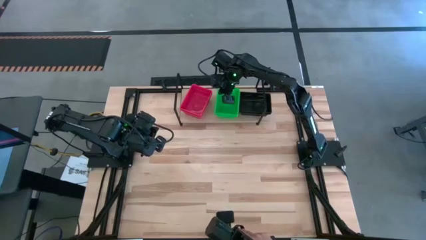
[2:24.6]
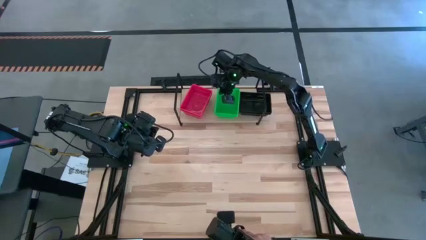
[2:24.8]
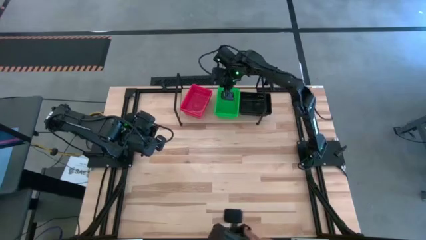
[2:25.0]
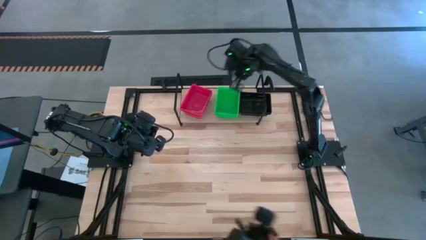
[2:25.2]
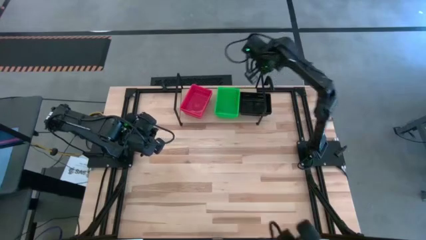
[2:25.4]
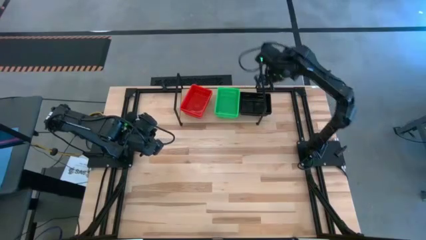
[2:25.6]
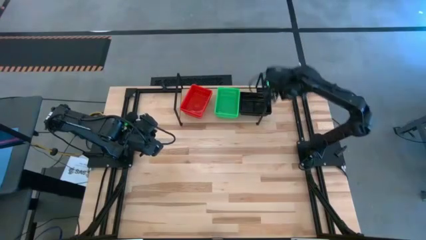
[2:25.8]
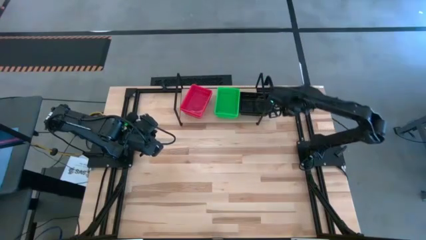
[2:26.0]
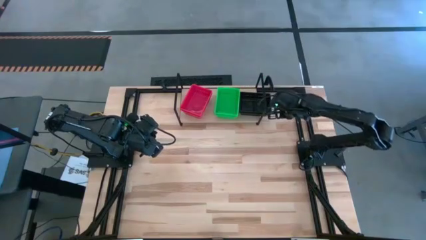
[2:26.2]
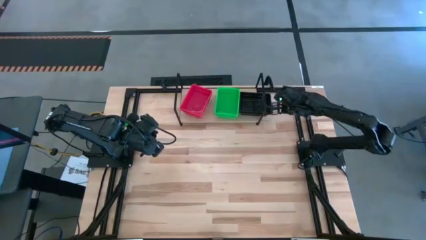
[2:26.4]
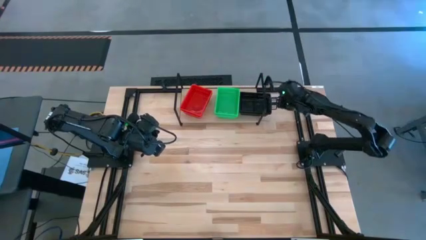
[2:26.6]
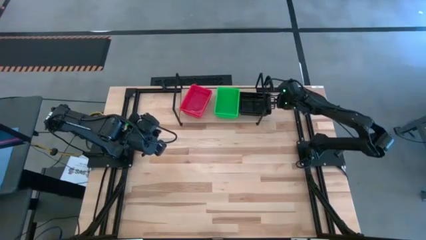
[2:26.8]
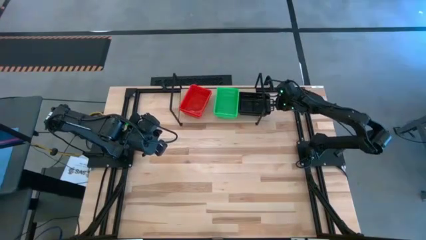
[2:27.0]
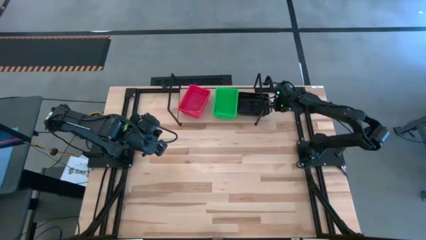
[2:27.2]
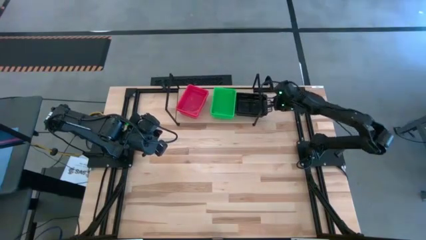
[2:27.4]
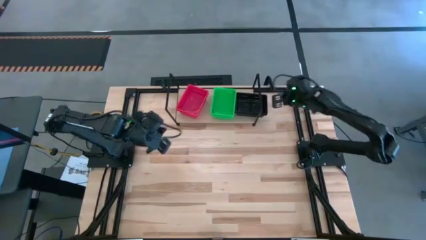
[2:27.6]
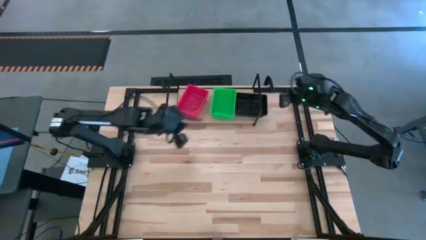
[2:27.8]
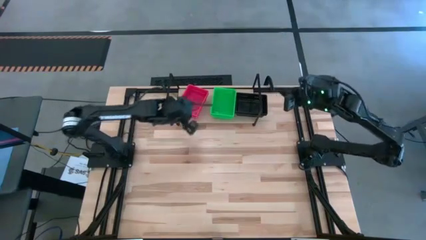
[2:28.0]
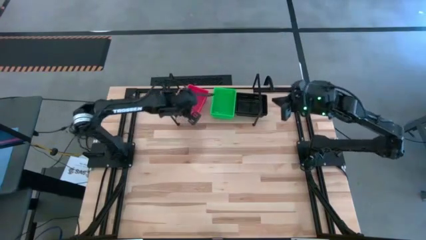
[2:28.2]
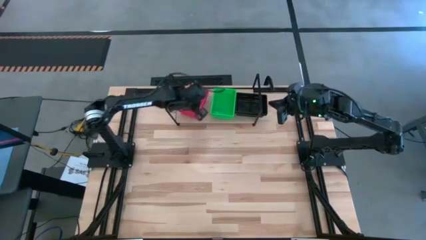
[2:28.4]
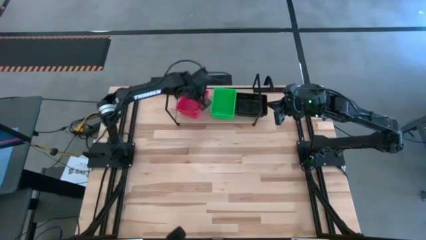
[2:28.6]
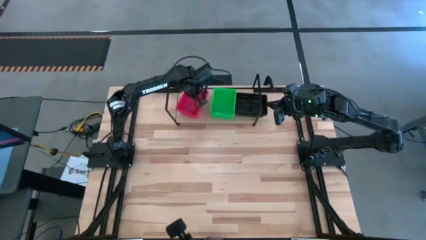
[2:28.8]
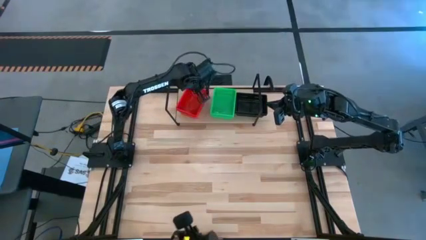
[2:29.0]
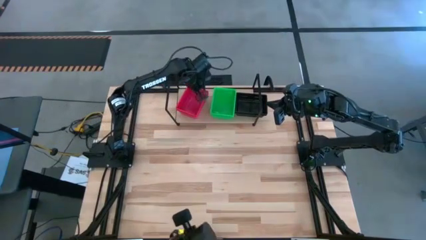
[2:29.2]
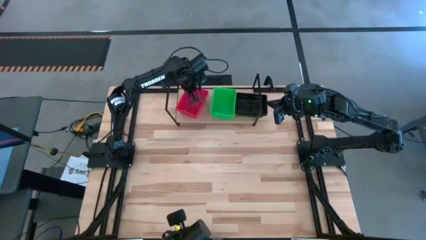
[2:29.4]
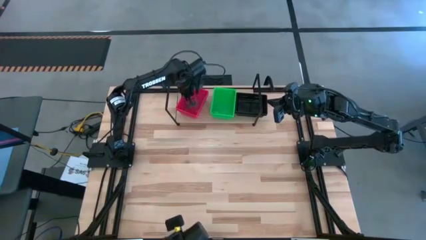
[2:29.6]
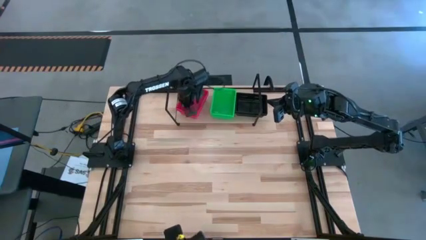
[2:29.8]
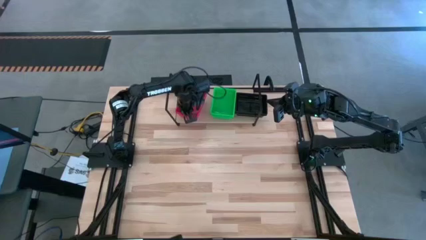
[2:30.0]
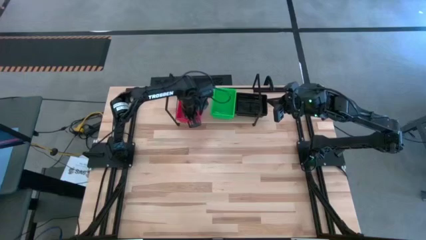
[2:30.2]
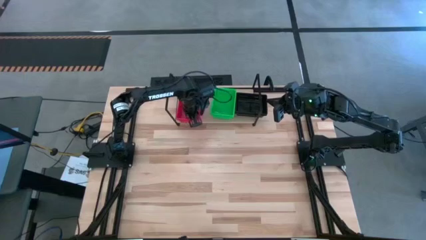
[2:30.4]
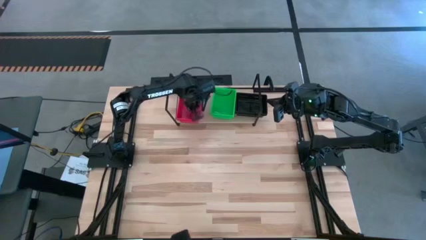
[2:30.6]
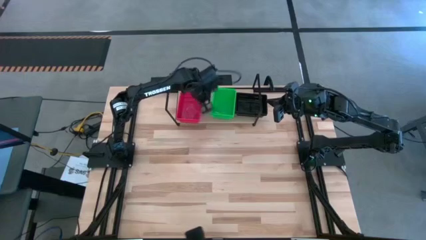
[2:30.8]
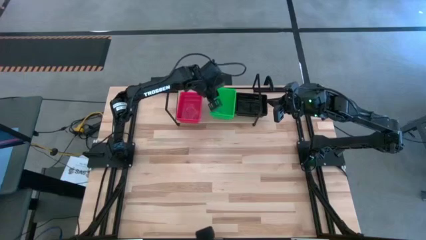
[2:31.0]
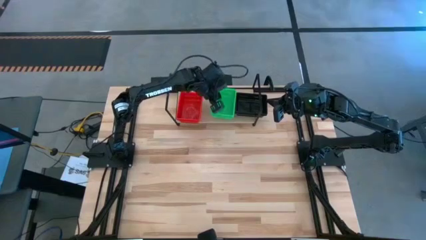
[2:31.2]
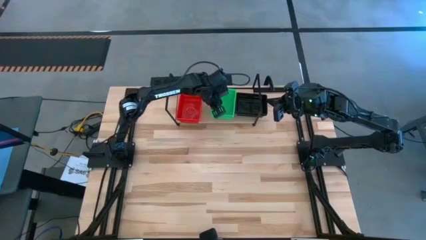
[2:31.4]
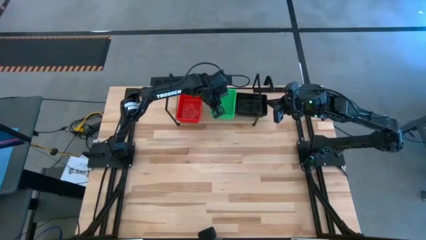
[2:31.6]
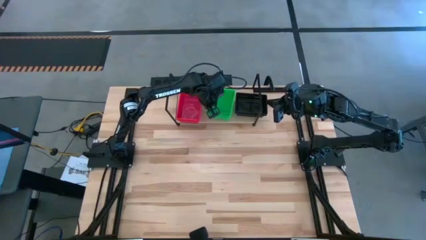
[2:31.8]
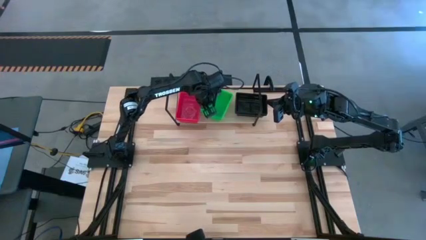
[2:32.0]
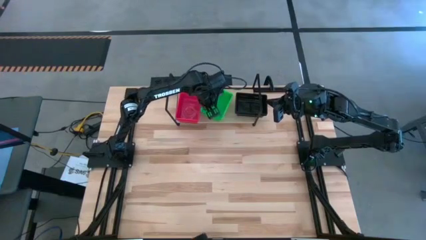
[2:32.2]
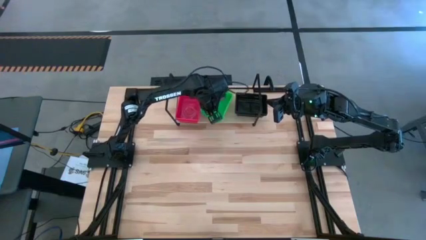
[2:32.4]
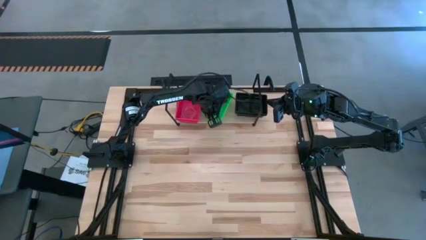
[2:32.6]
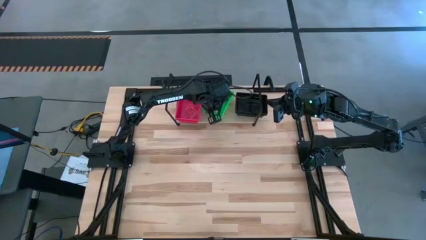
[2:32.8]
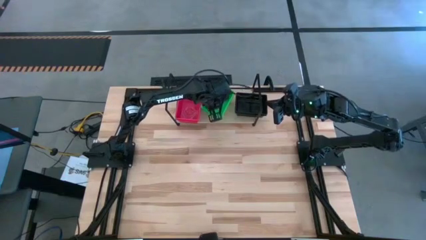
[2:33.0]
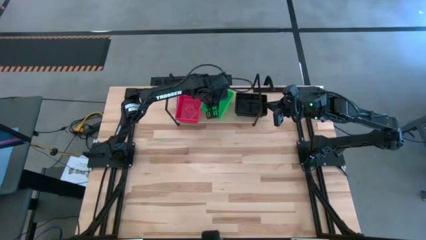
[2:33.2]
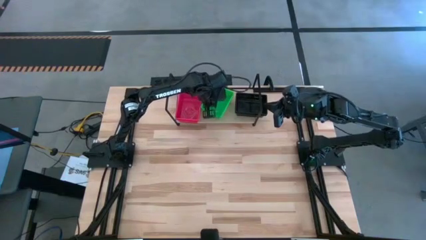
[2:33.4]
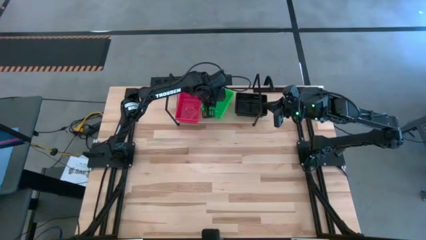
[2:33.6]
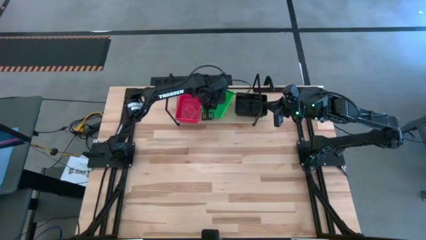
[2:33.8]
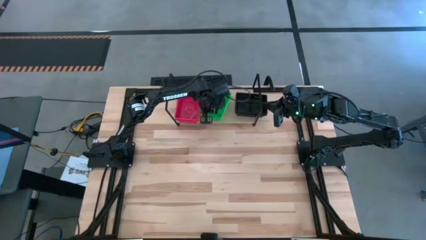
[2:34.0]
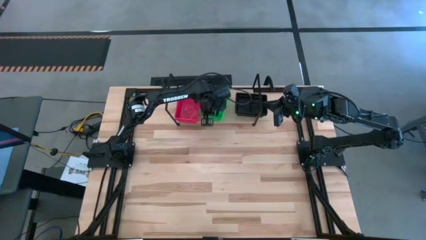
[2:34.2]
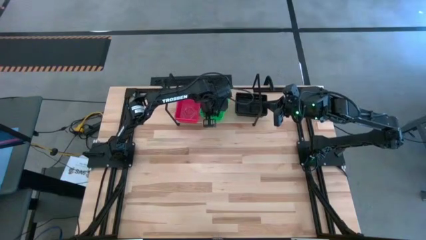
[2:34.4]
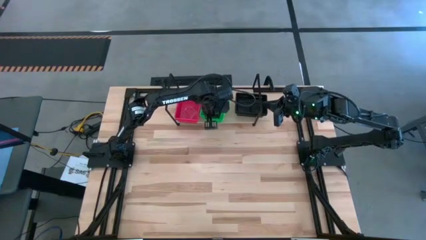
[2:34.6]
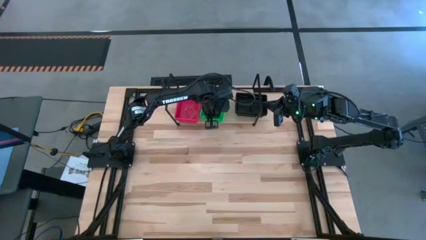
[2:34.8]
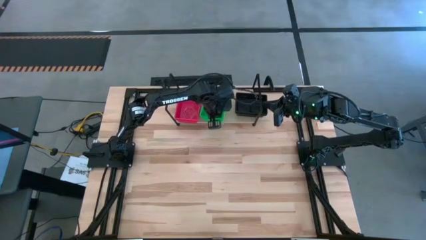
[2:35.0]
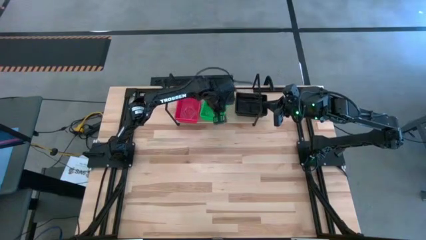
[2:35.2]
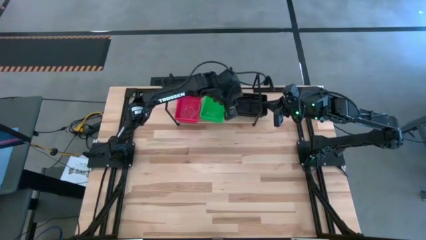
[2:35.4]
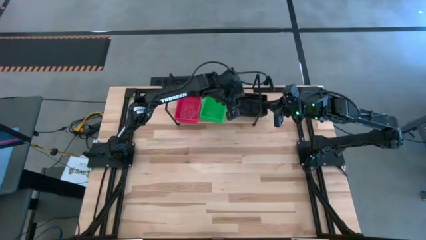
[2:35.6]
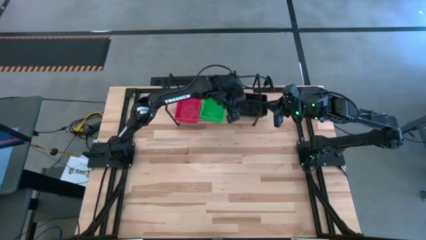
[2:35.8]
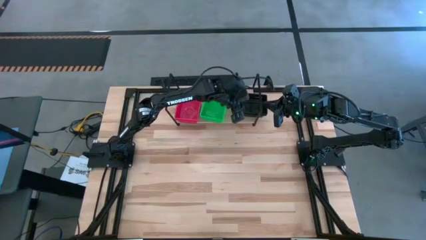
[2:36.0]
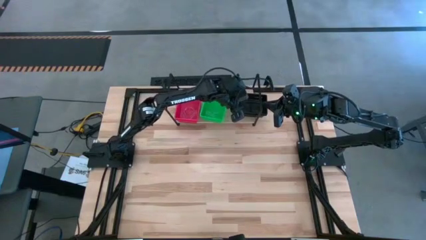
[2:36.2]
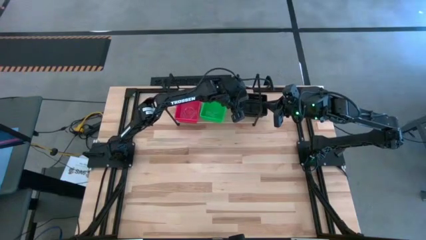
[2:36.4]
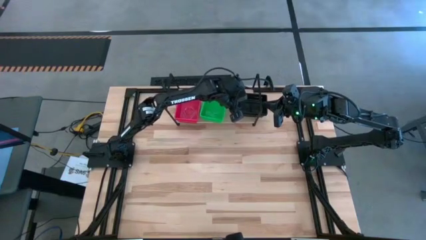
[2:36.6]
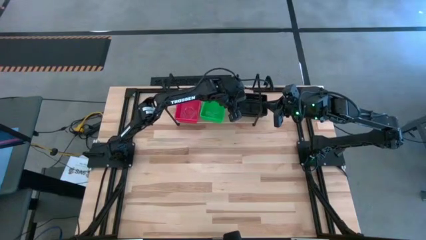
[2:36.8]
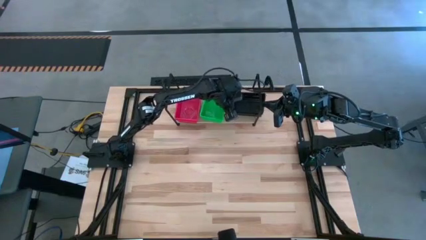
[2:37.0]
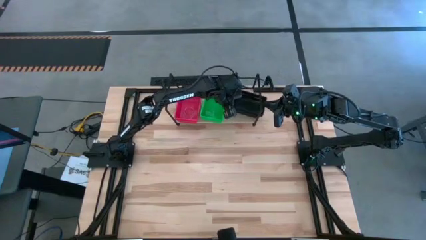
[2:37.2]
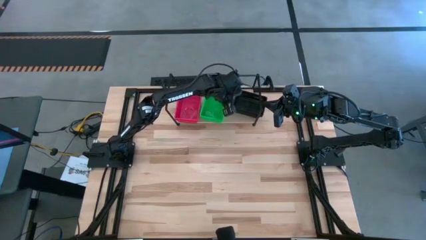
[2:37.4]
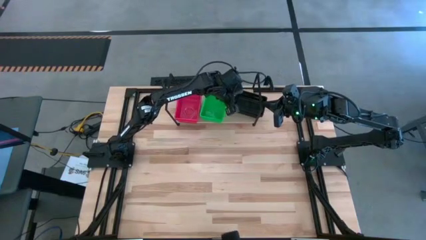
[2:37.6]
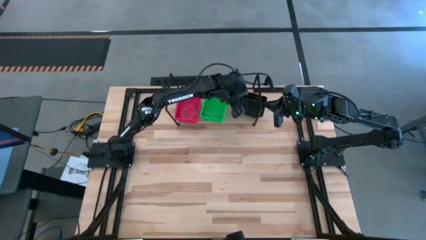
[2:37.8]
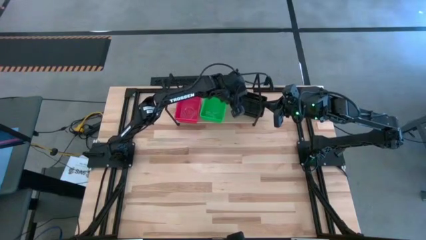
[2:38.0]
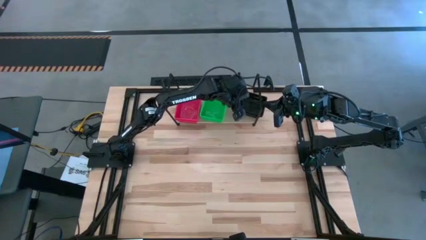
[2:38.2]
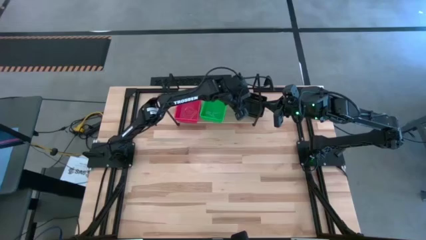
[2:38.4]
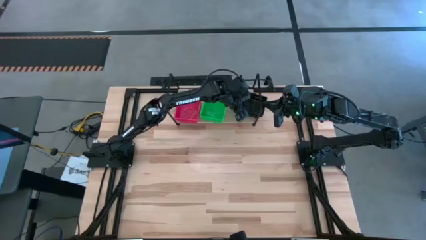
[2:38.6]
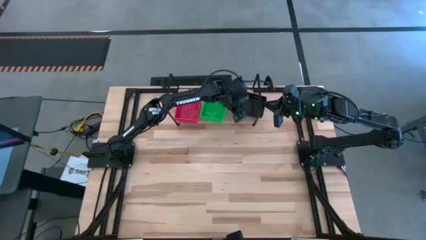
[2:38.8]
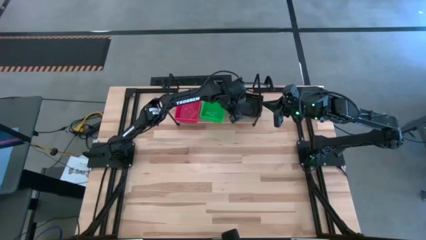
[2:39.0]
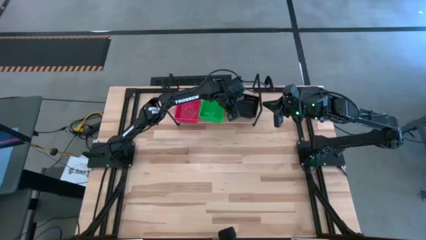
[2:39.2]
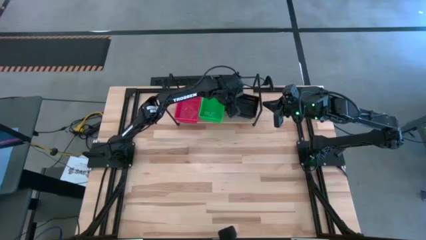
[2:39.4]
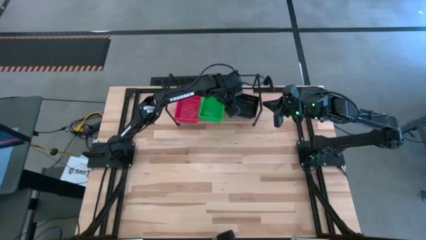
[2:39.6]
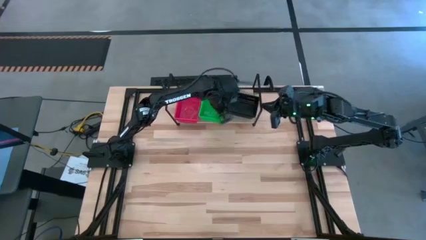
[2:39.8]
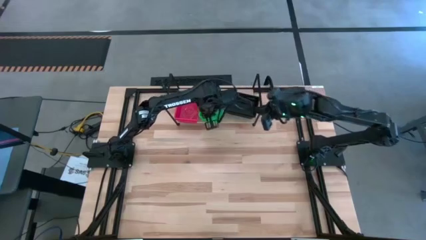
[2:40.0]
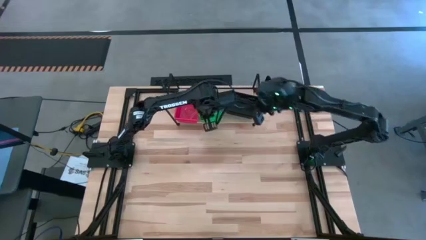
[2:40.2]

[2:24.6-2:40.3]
Task: Stack baskets on shelf by color
Adjust the stacked bins on the shelf
